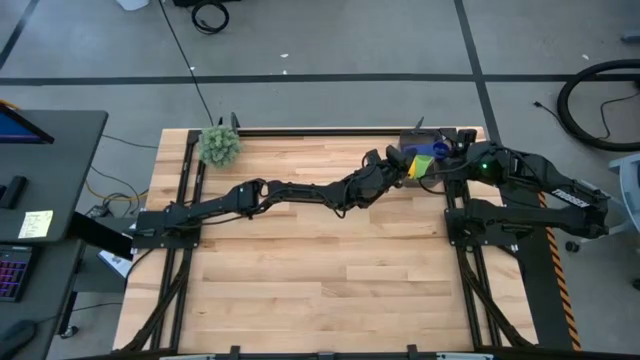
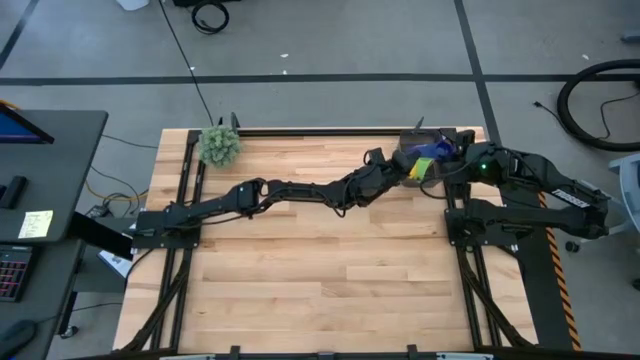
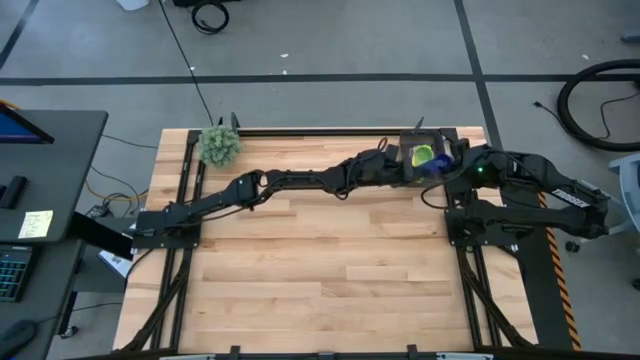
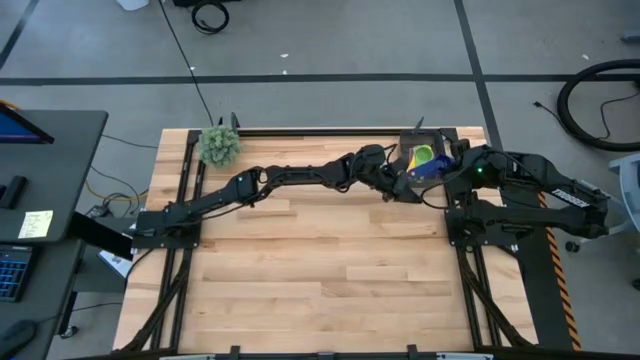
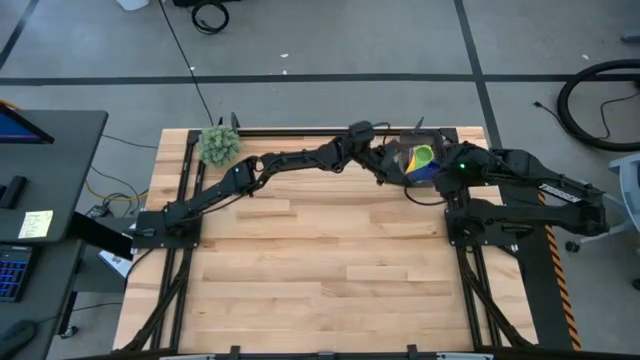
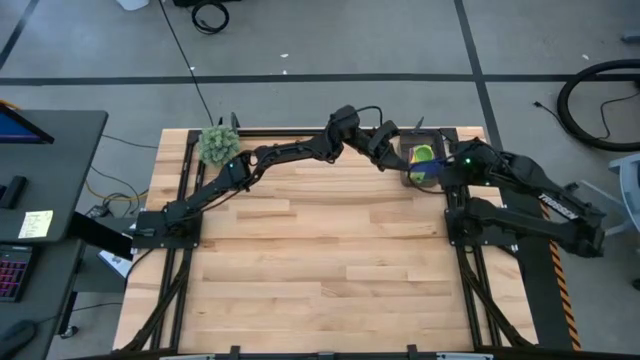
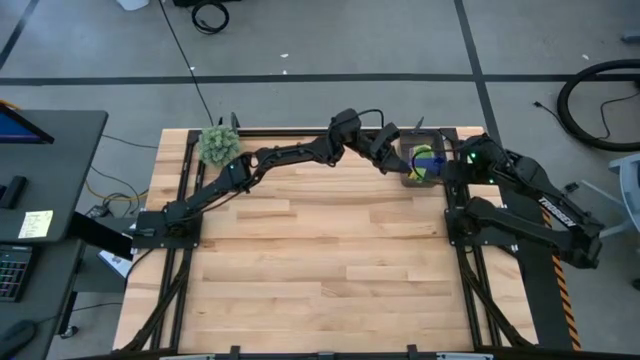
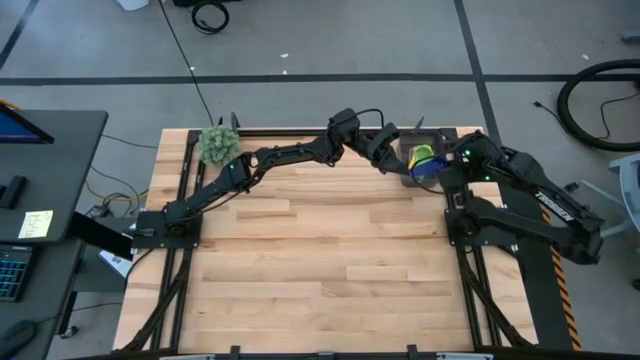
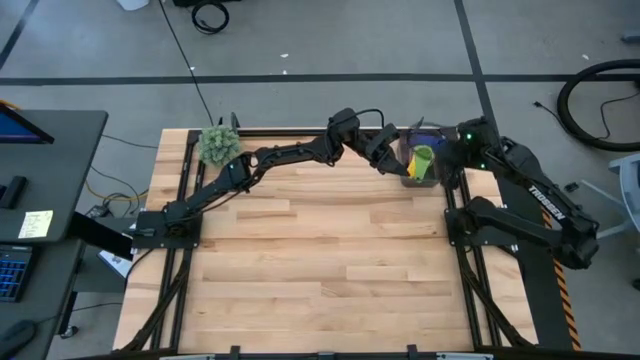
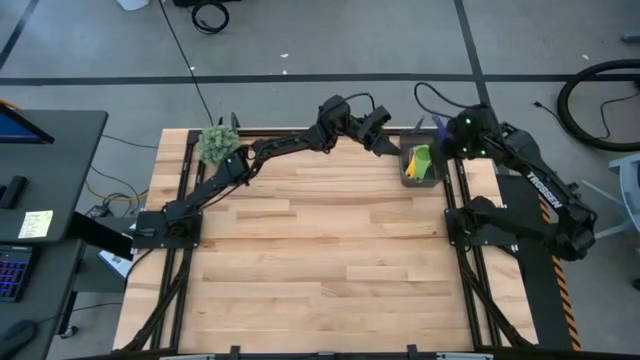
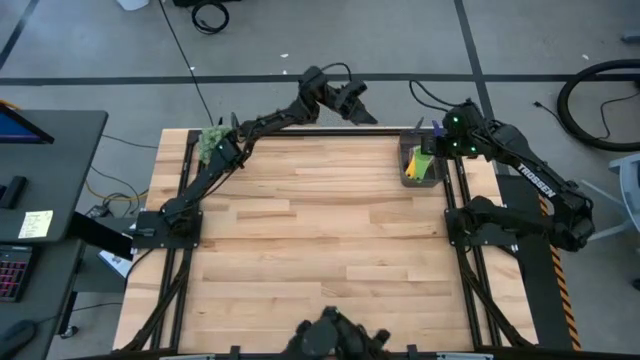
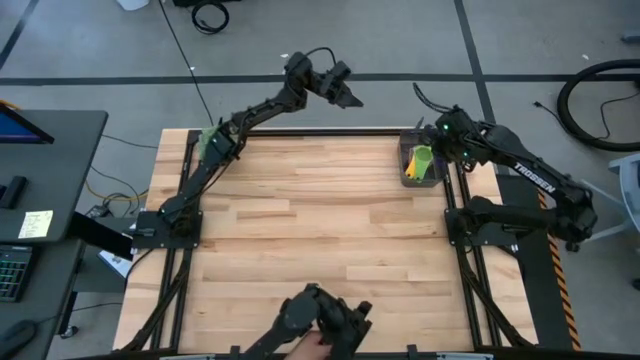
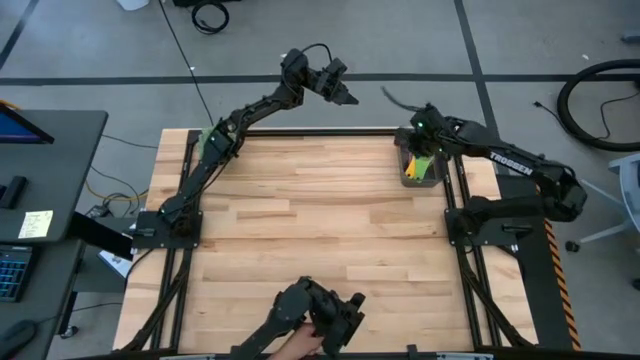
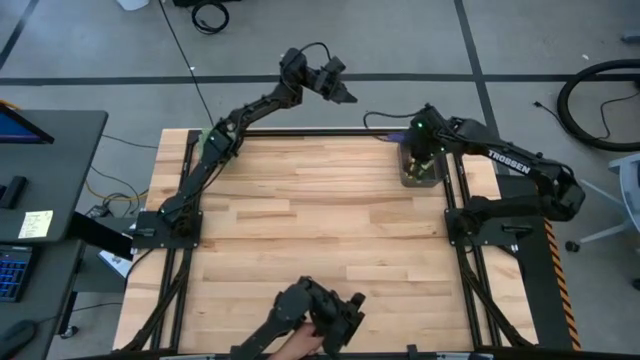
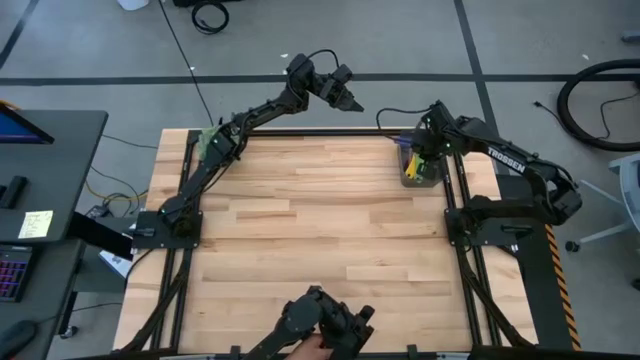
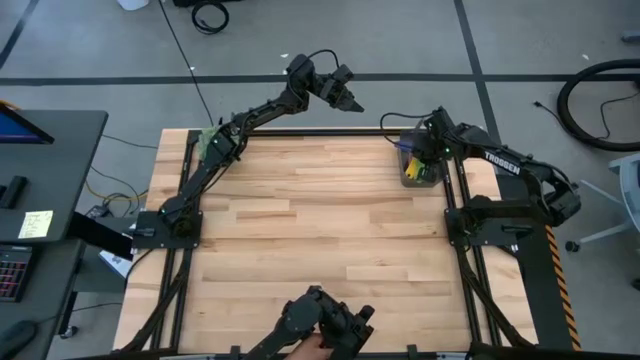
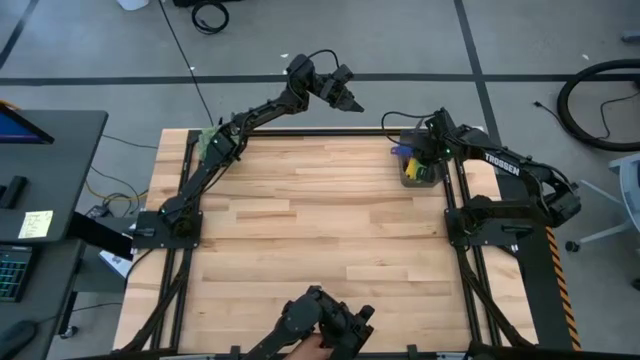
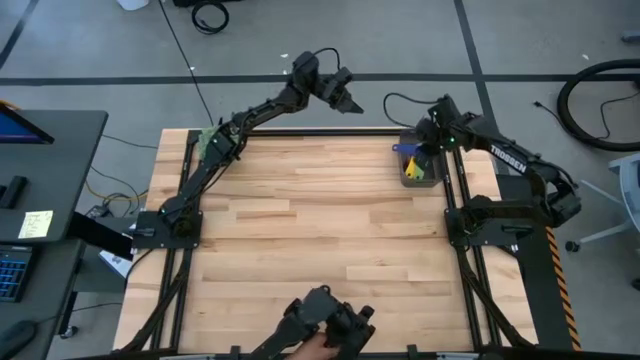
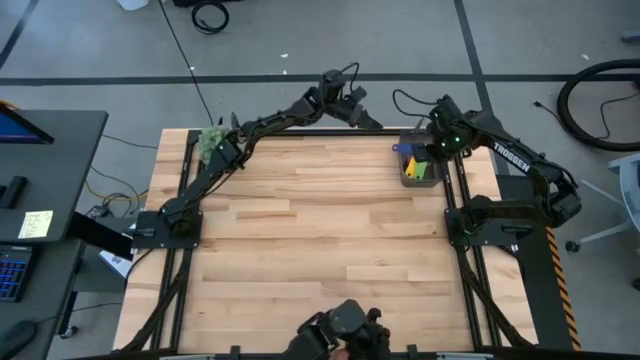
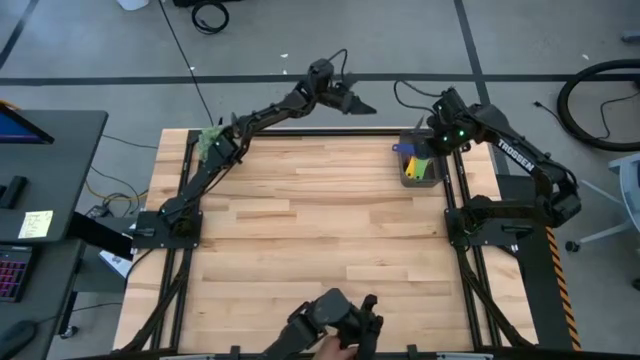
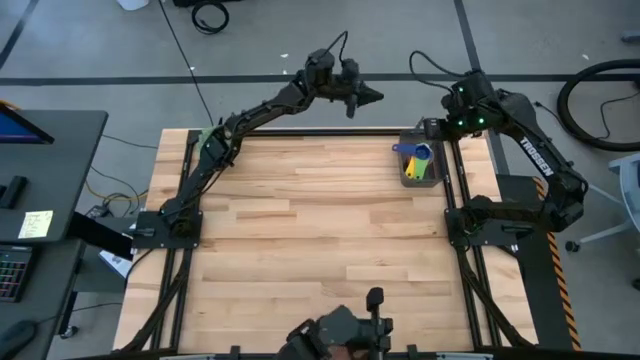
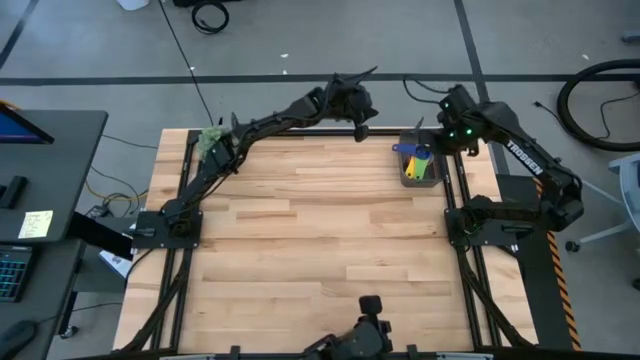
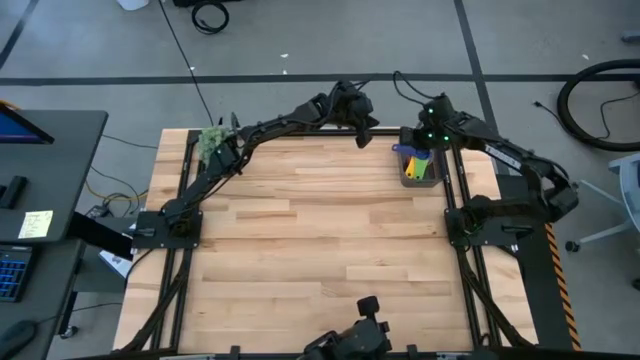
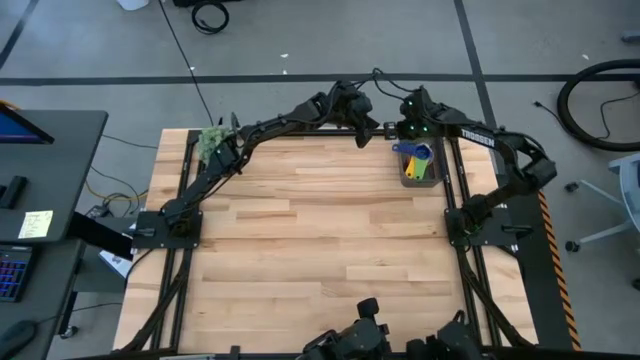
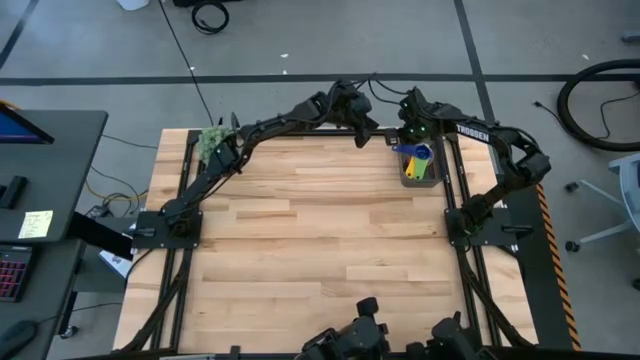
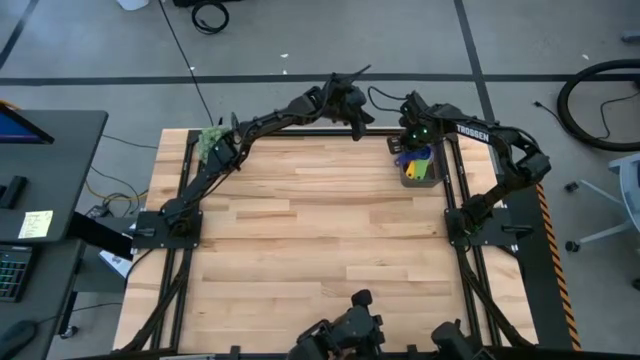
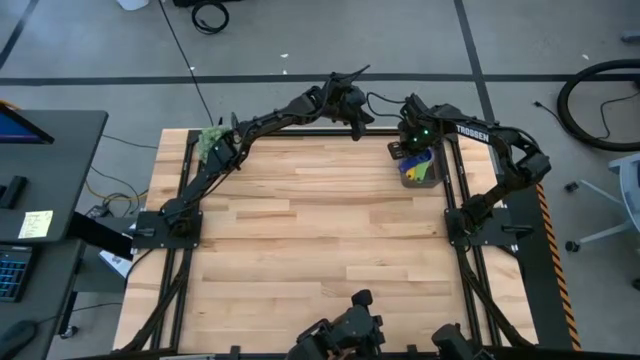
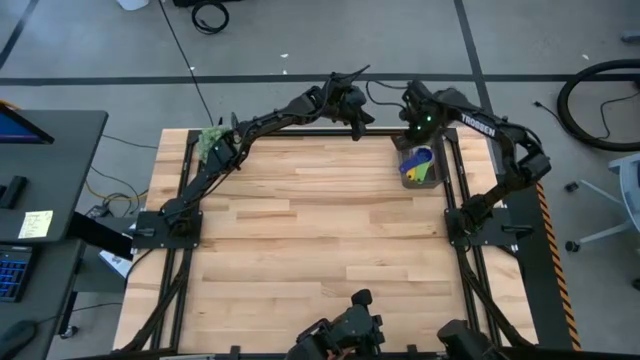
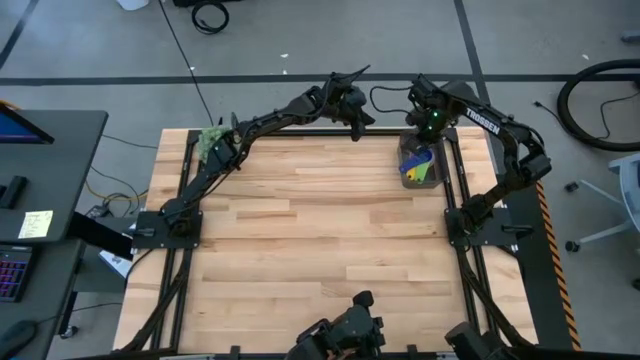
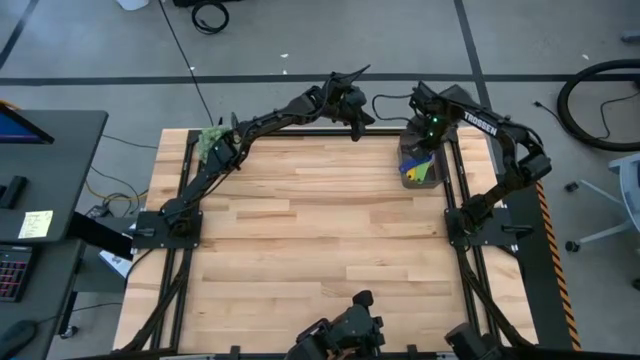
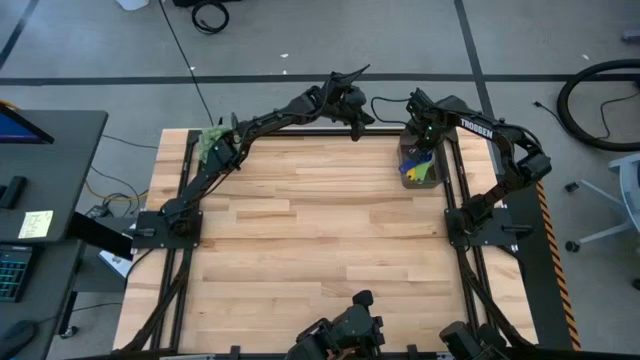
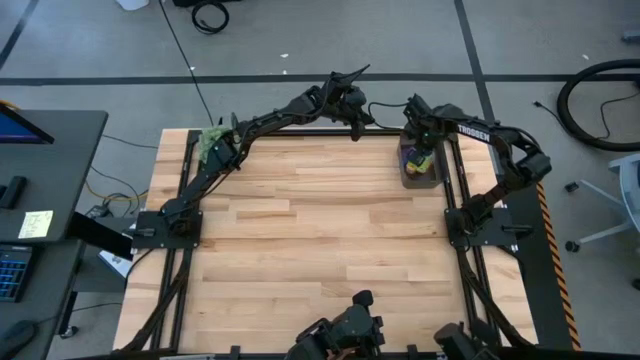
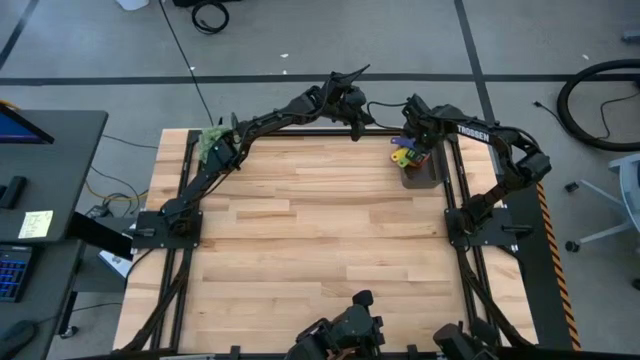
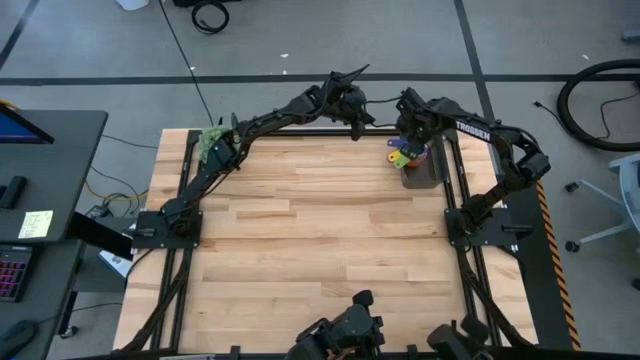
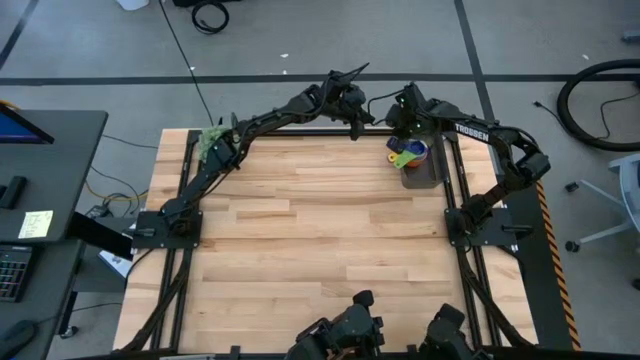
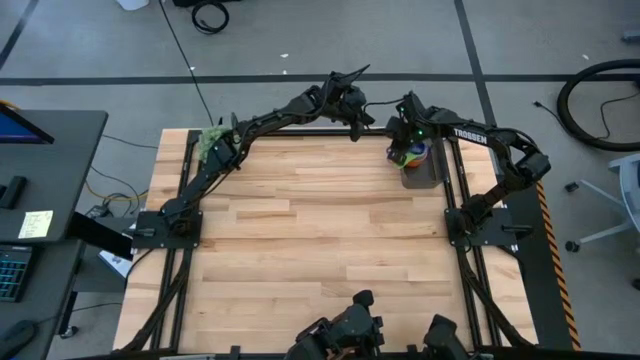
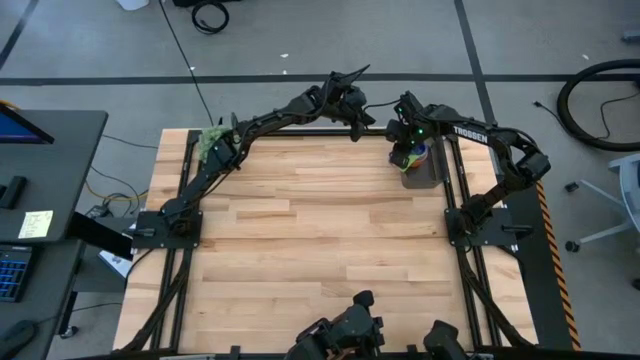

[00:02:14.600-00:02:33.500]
Task: Nest measuring cups in basket
Stack the purple measuring cup on top of the green measuring cup in the black bin

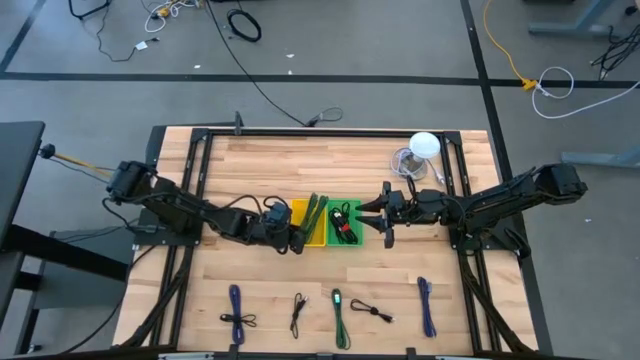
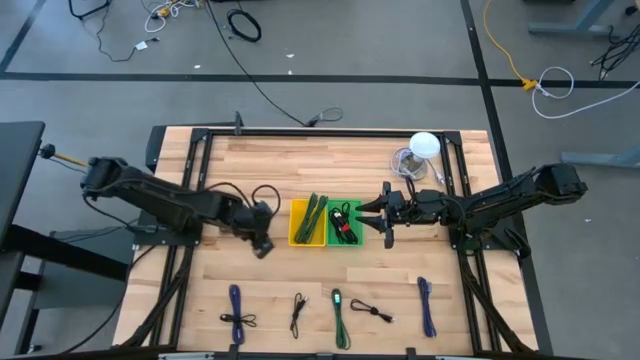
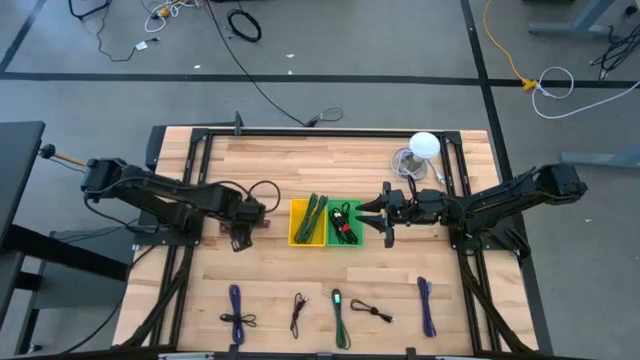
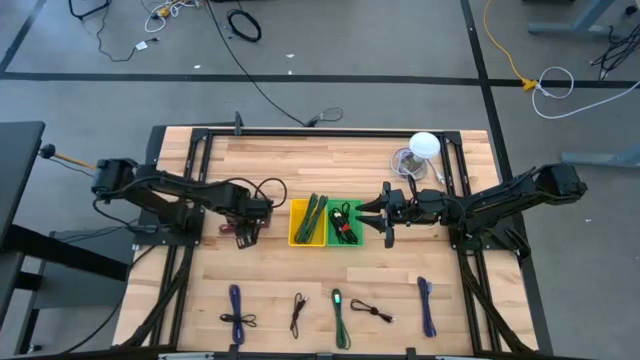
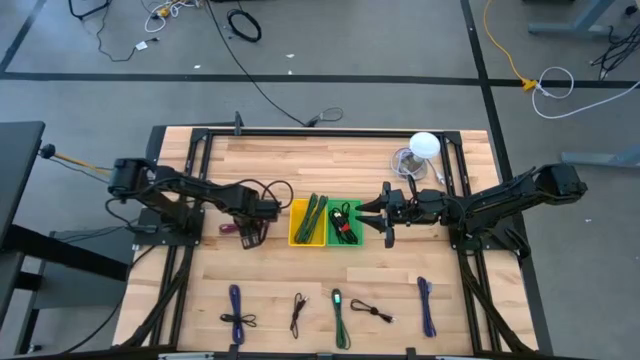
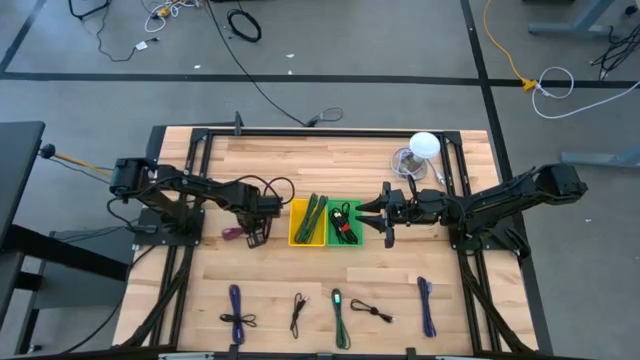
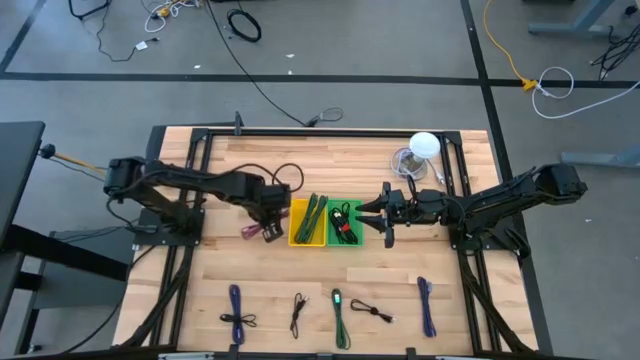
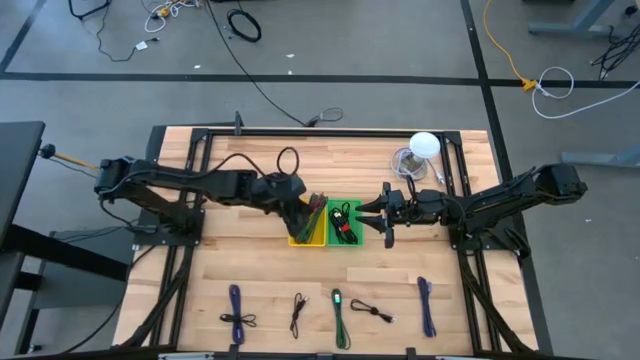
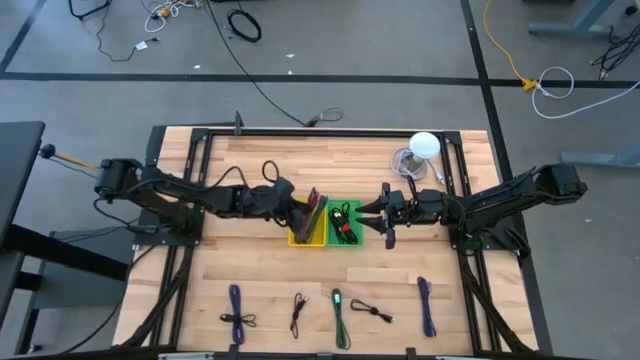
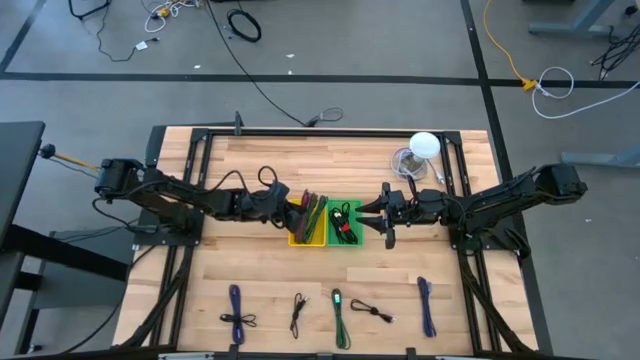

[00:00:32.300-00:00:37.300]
Task: Pick & Place USB Port
Put the pink charger cable into the yellow basket
